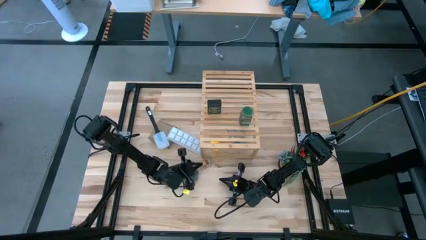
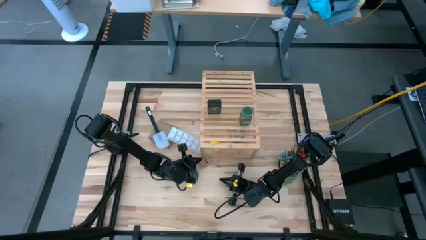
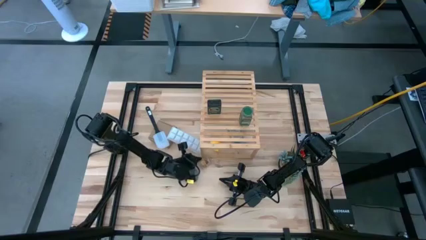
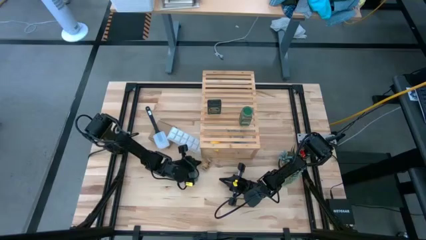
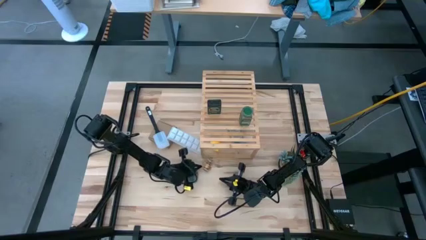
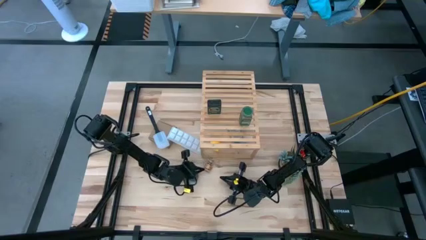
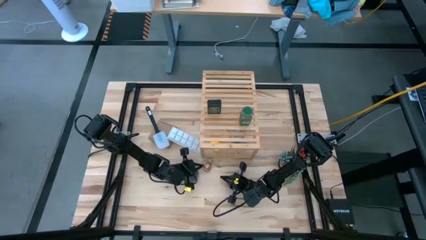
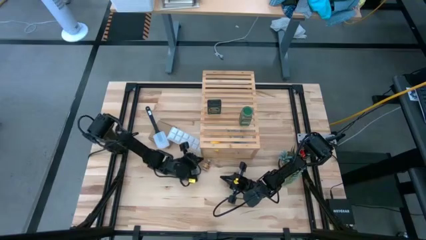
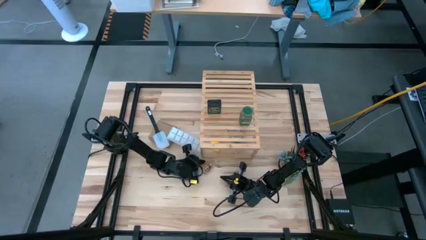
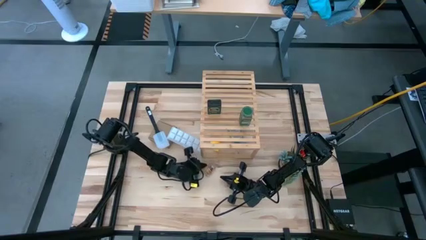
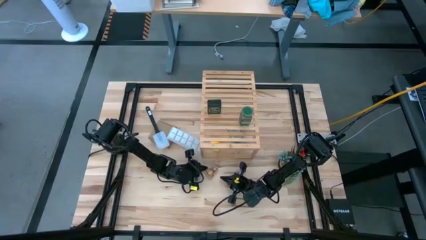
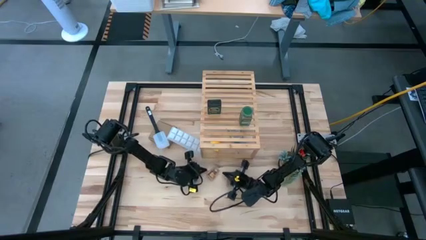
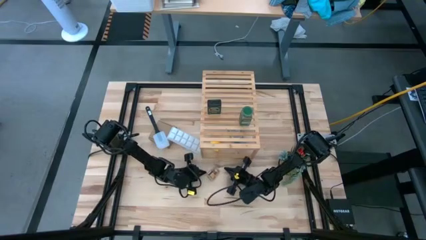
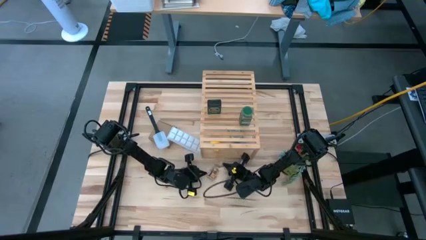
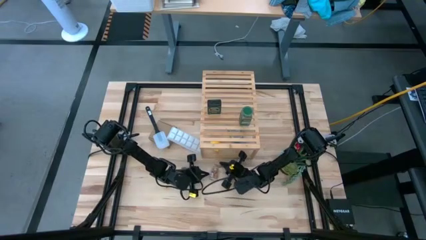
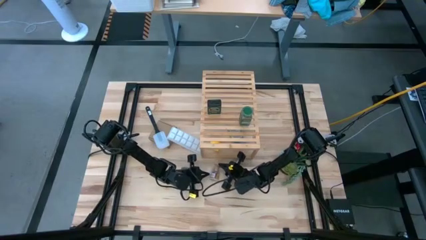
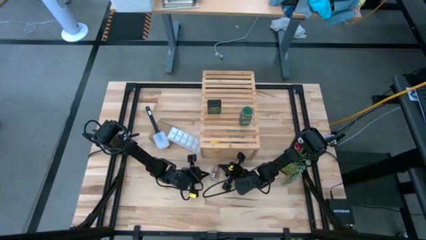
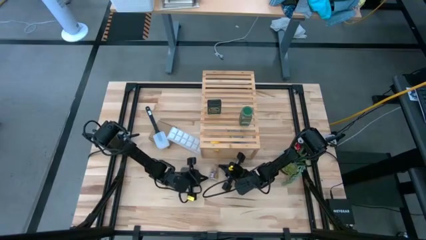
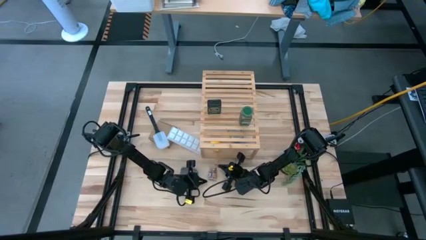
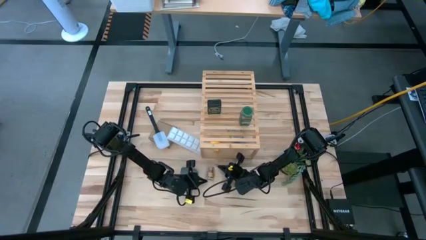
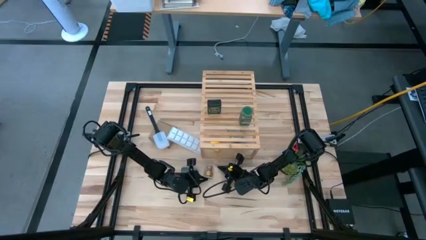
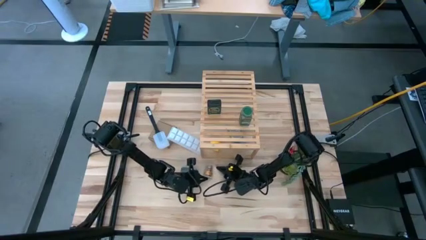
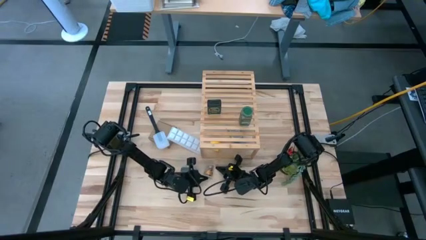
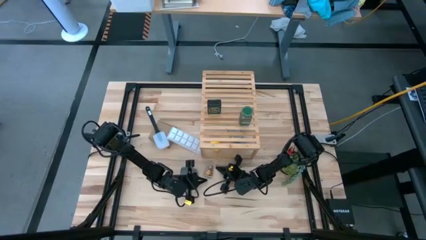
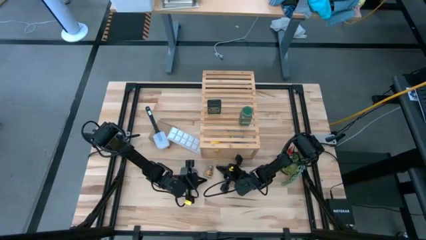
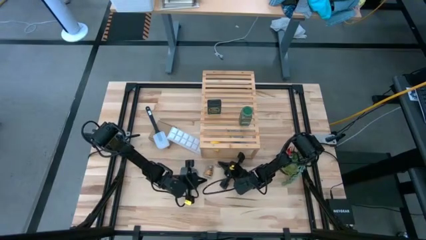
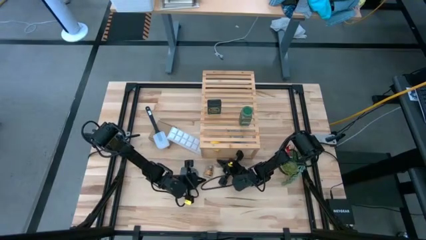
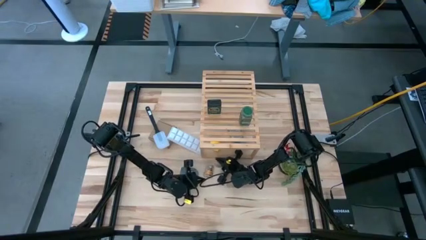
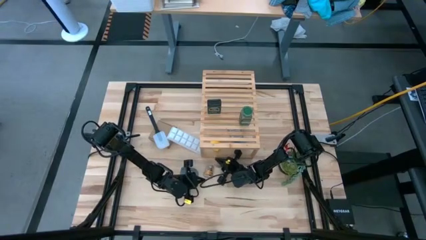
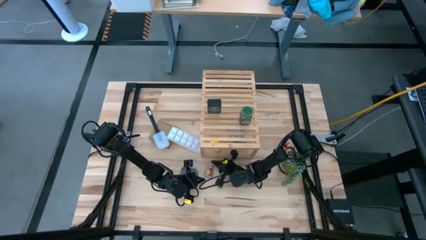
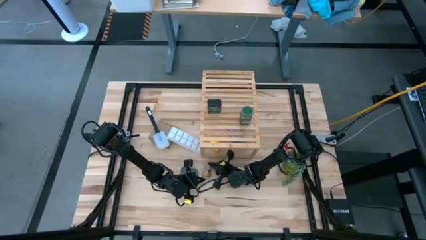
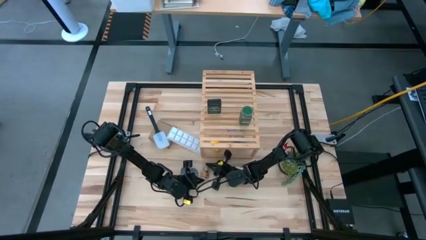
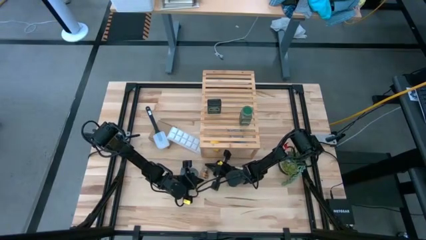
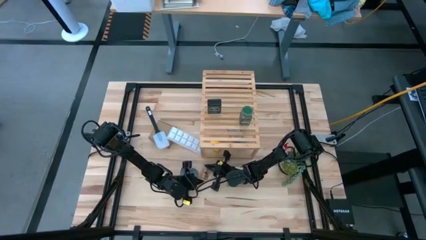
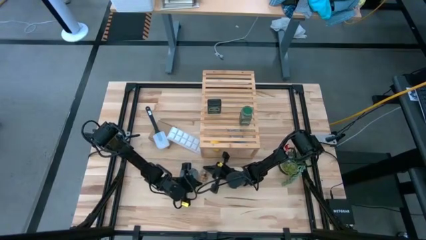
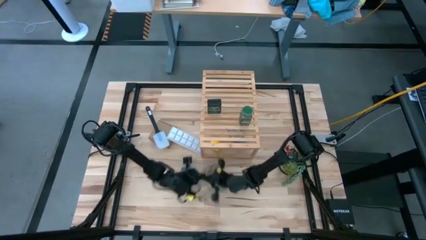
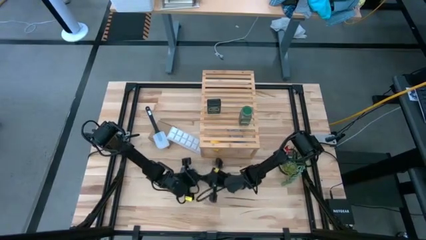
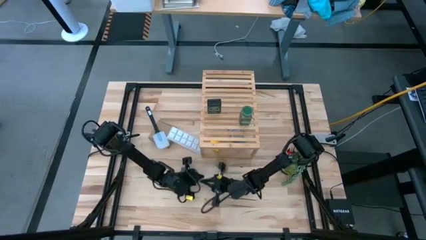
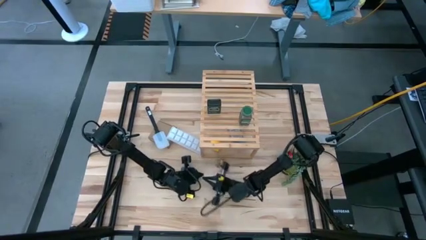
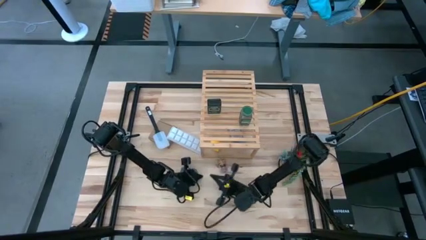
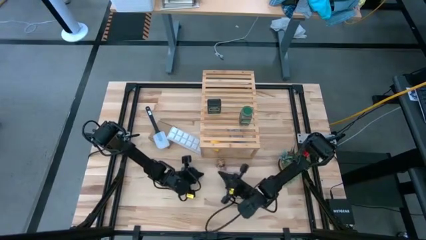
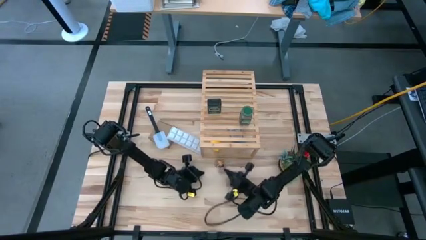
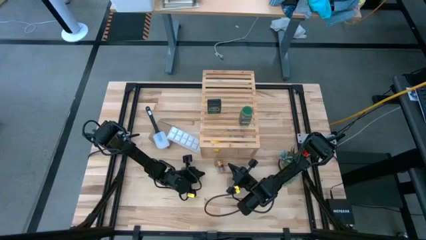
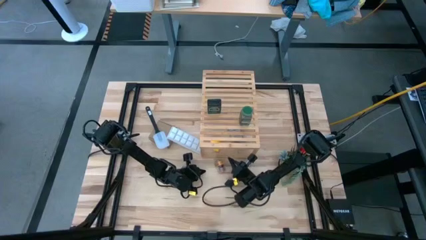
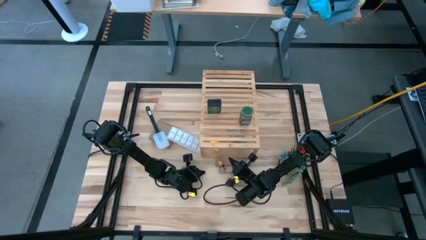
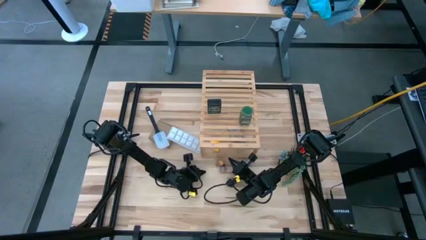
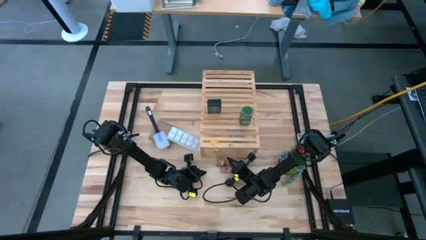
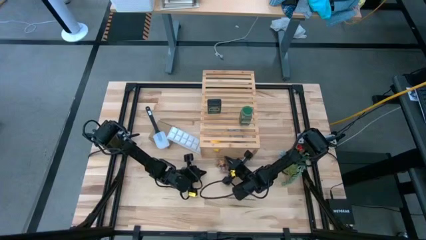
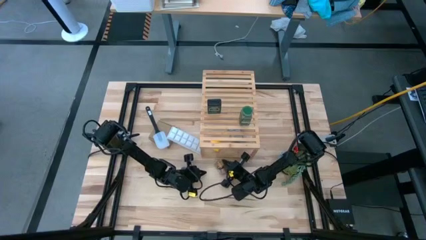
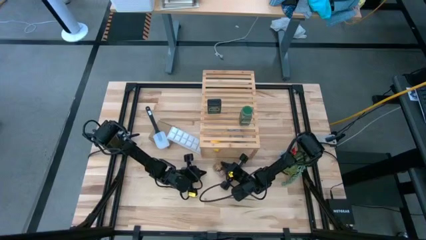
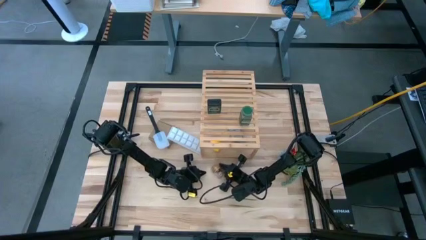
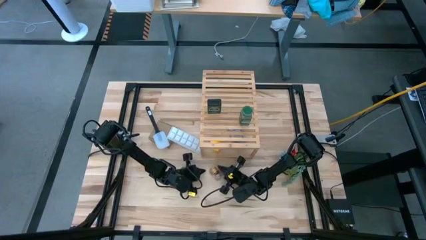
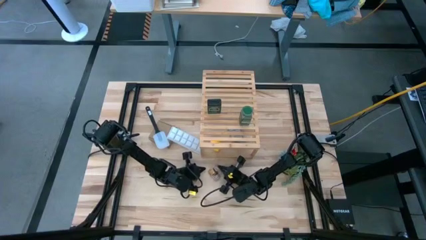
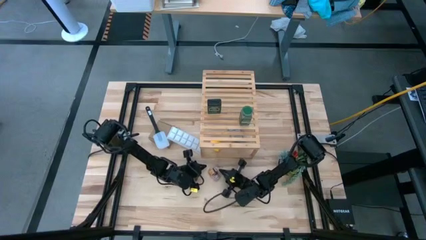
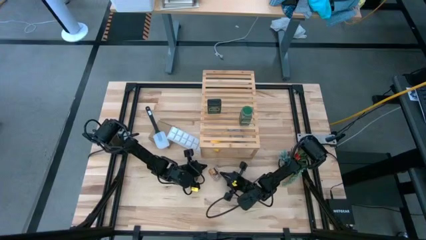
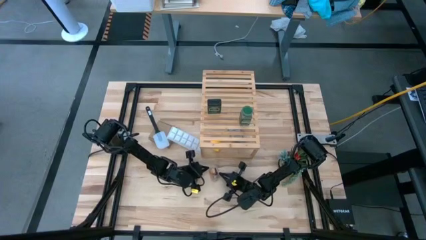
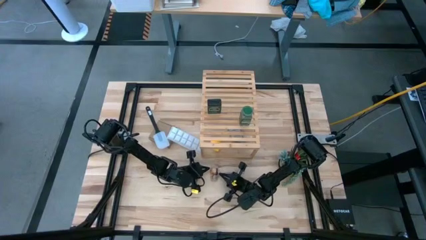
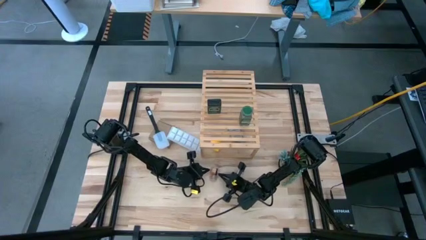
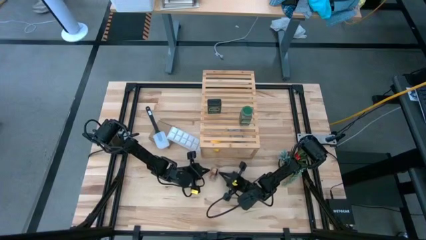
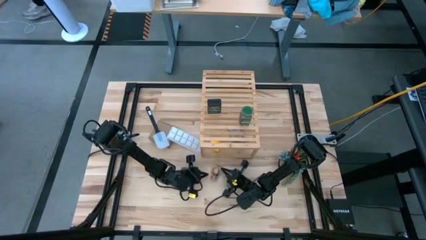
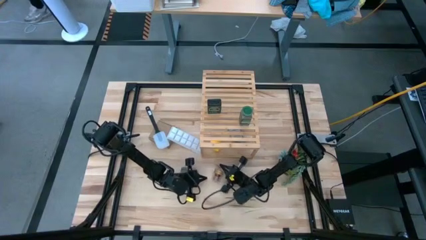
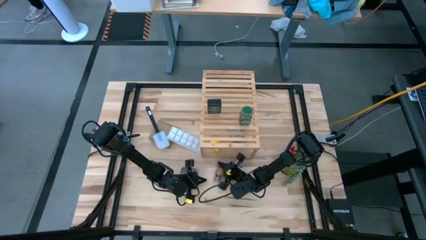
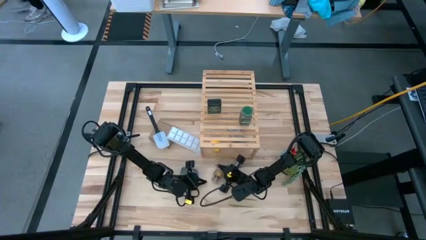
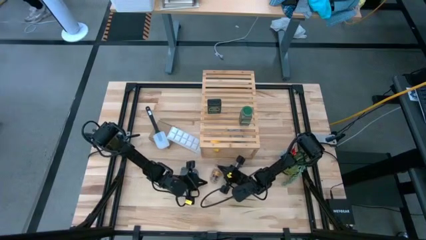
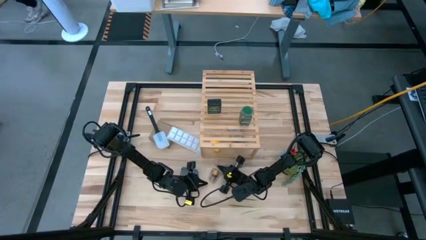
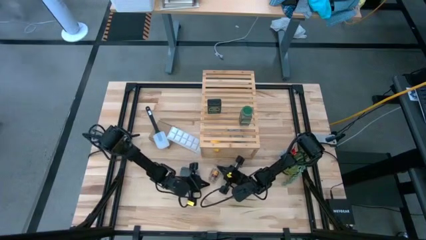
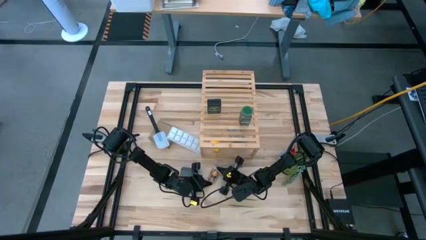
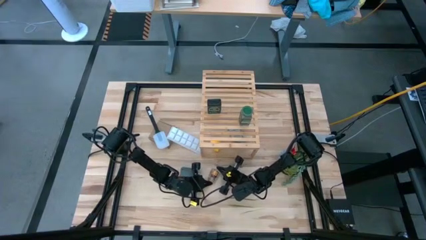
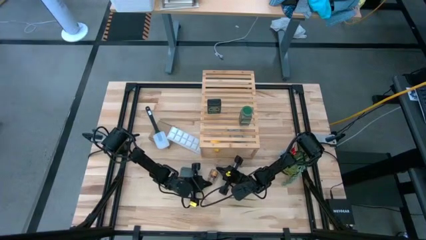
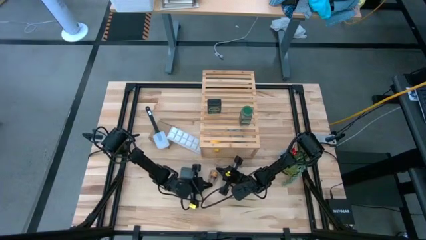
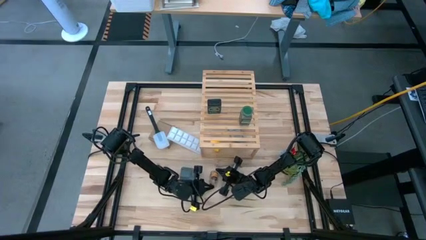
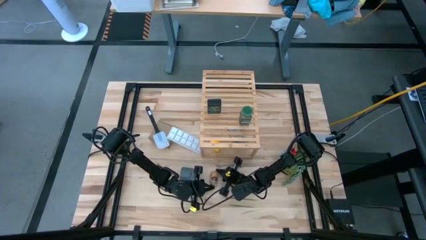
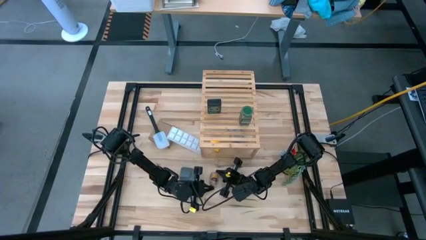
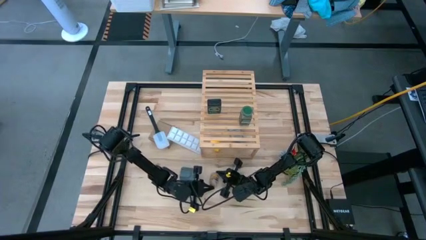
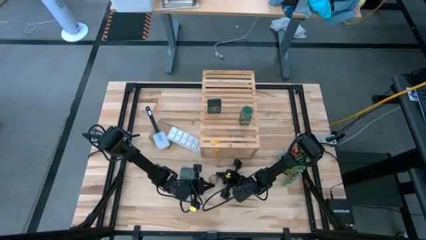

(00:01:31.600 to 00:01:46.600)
Task: Shelf spices
Put the brown seasoning bottle on the shelf
